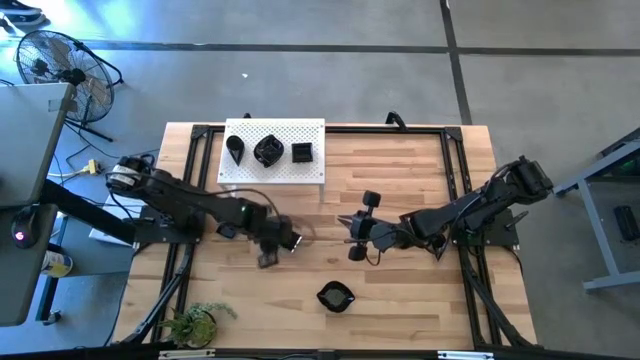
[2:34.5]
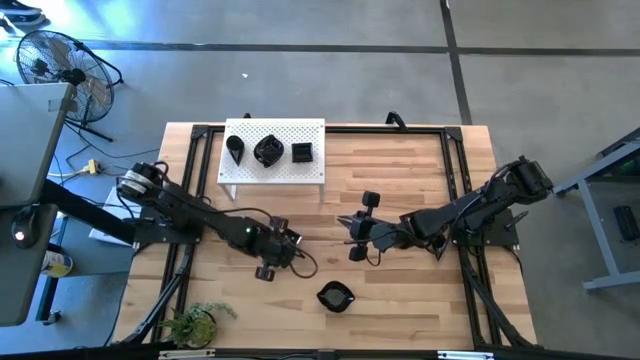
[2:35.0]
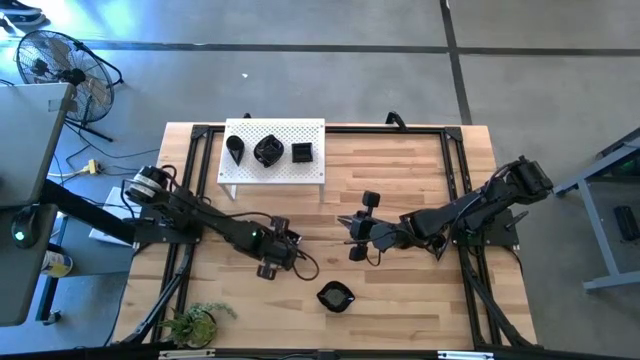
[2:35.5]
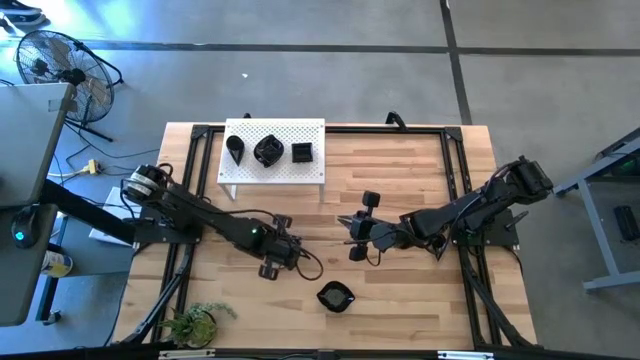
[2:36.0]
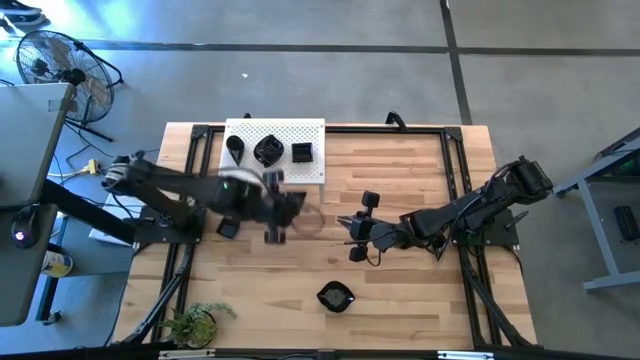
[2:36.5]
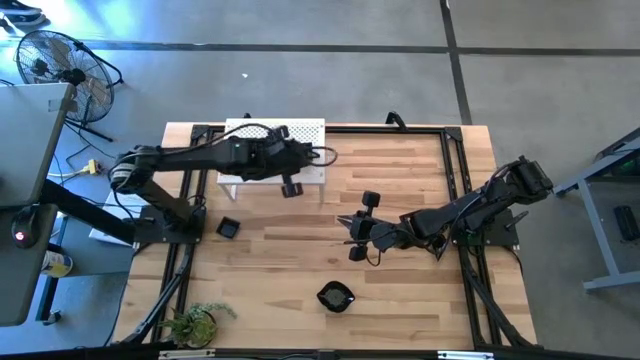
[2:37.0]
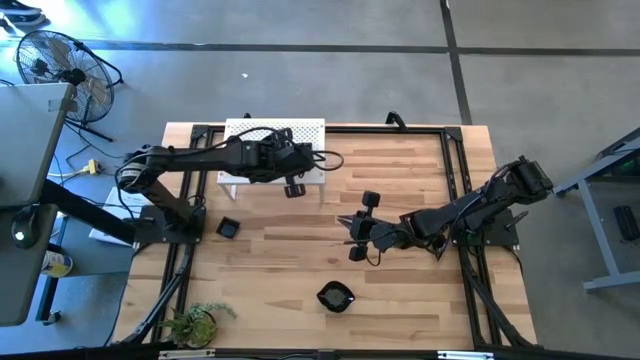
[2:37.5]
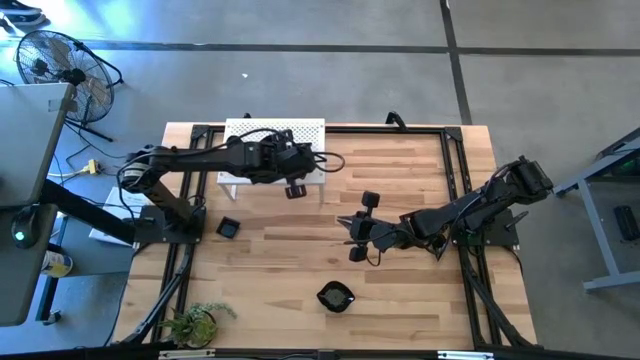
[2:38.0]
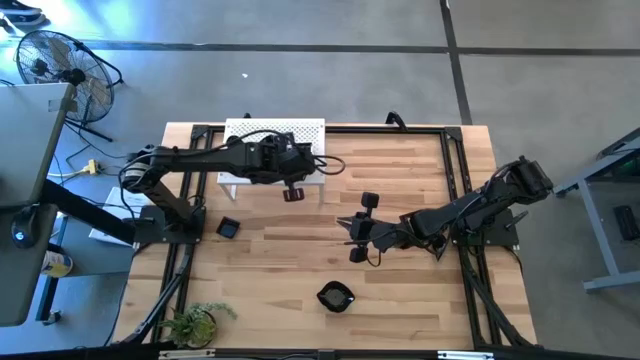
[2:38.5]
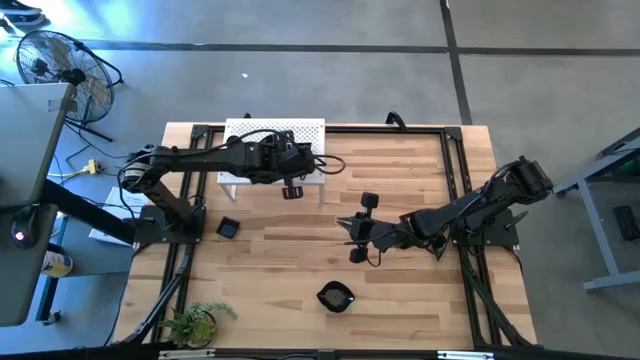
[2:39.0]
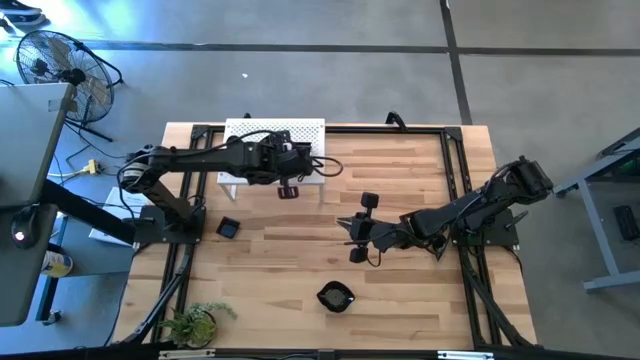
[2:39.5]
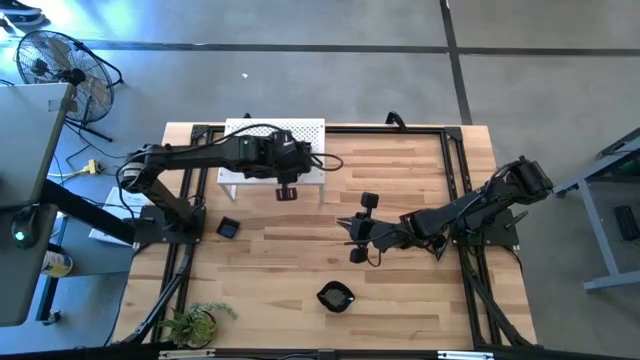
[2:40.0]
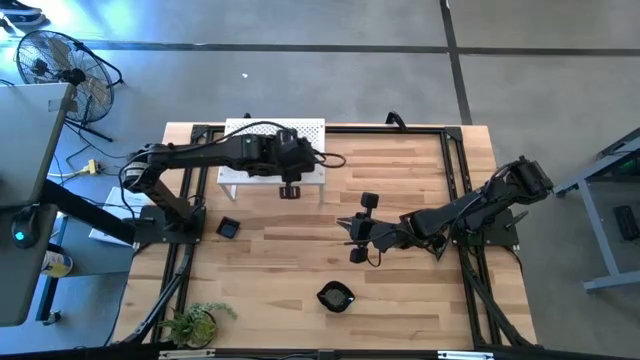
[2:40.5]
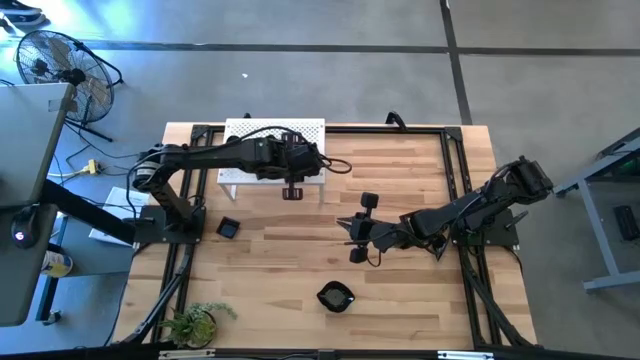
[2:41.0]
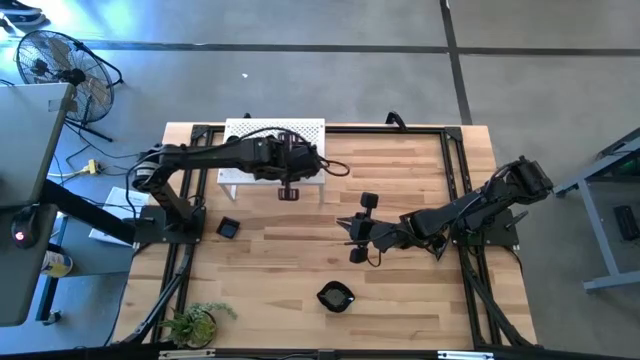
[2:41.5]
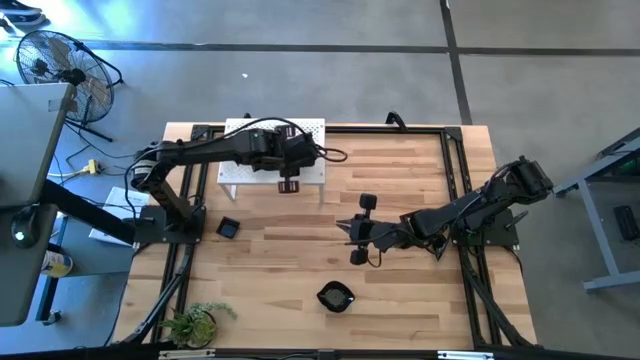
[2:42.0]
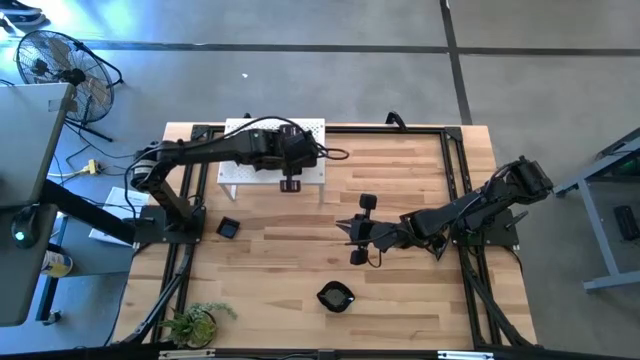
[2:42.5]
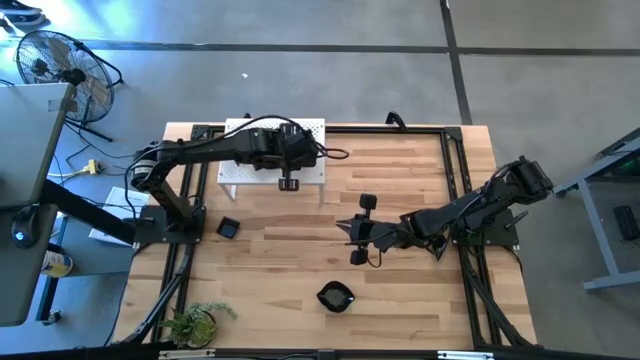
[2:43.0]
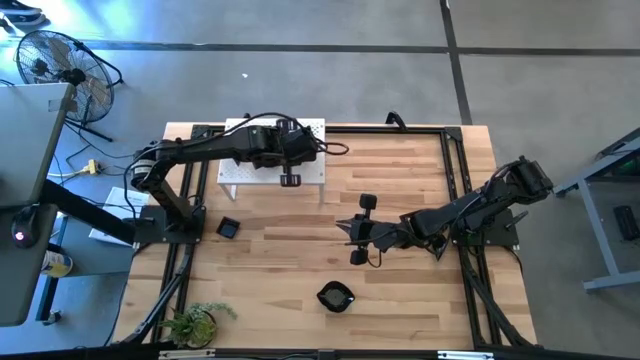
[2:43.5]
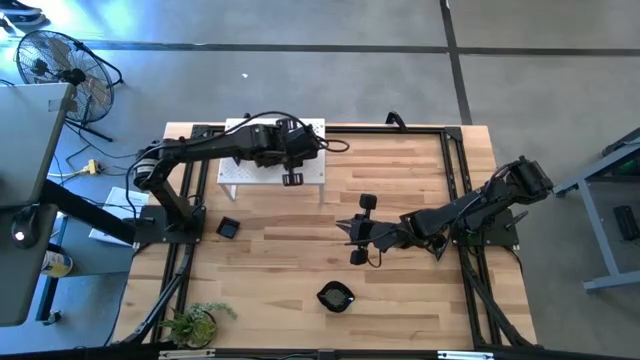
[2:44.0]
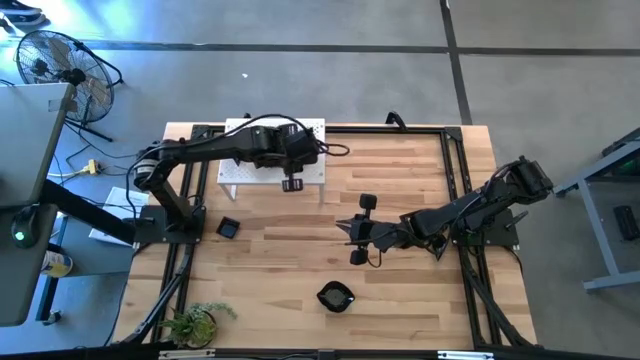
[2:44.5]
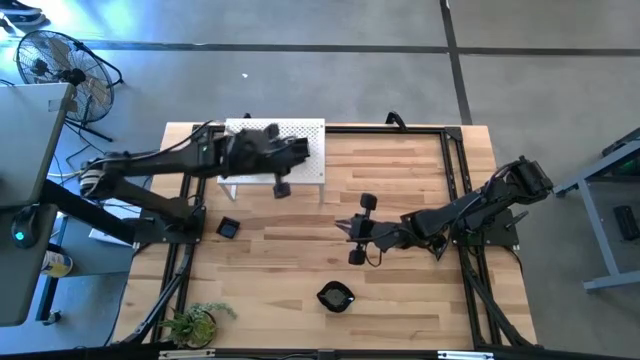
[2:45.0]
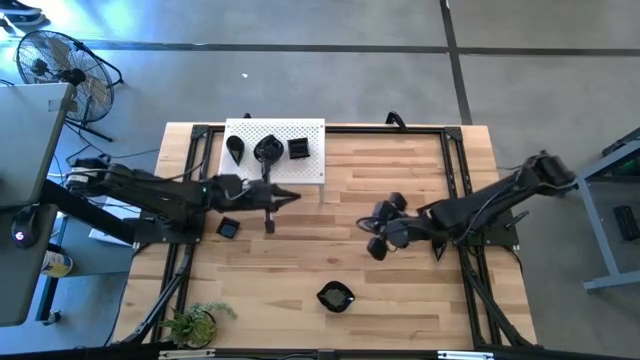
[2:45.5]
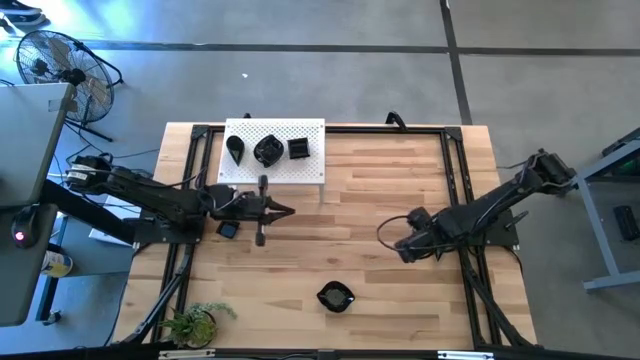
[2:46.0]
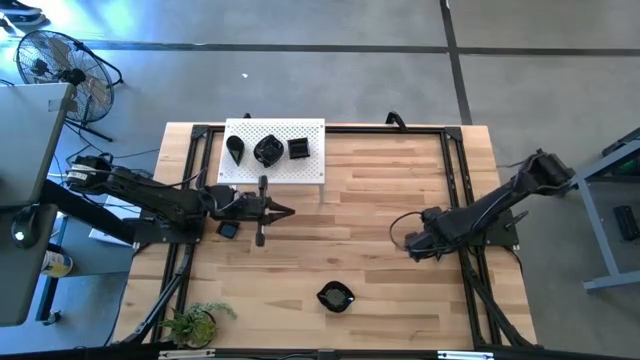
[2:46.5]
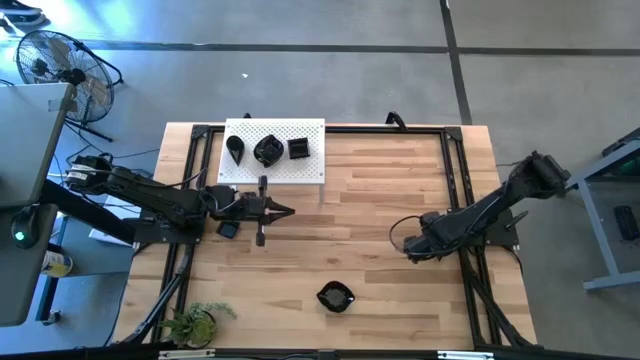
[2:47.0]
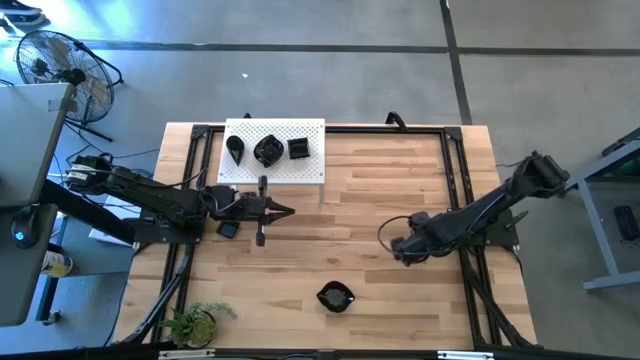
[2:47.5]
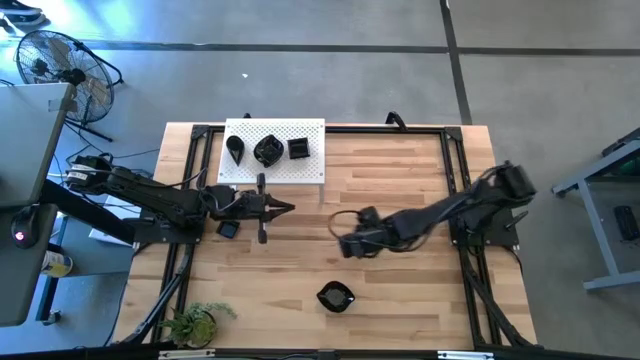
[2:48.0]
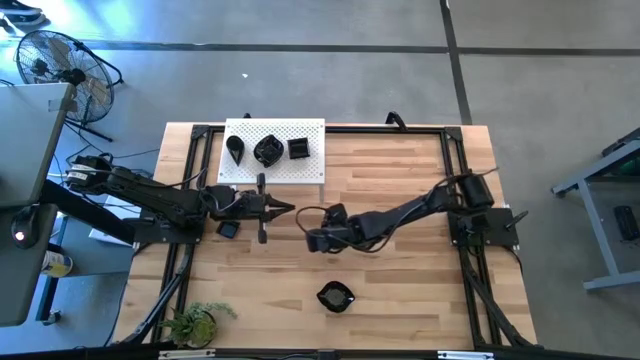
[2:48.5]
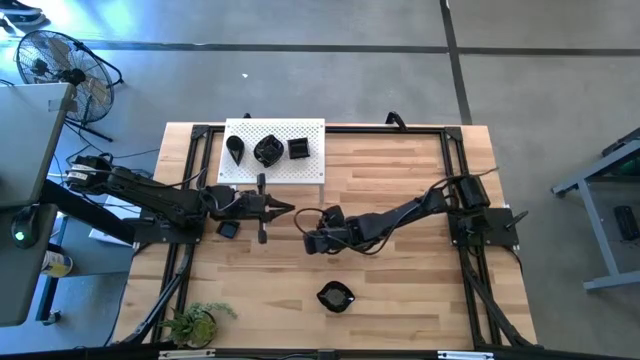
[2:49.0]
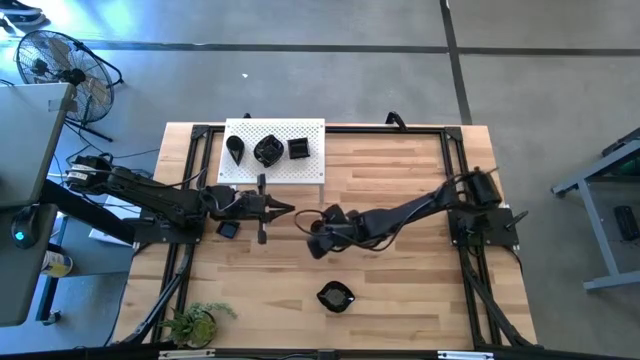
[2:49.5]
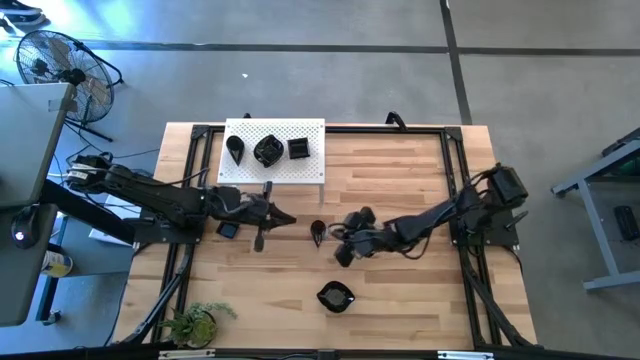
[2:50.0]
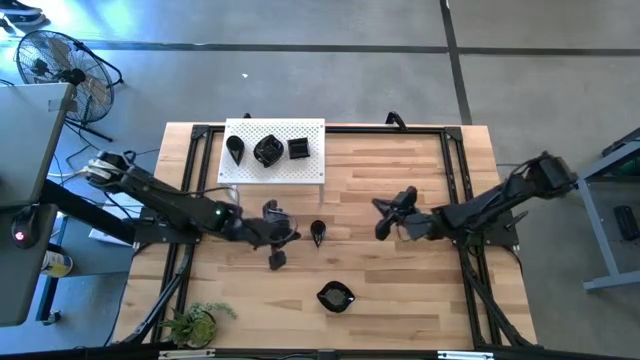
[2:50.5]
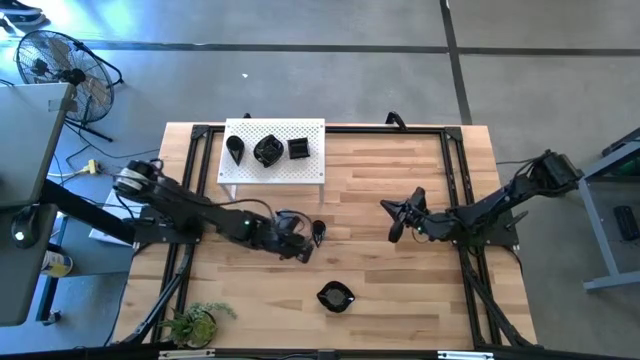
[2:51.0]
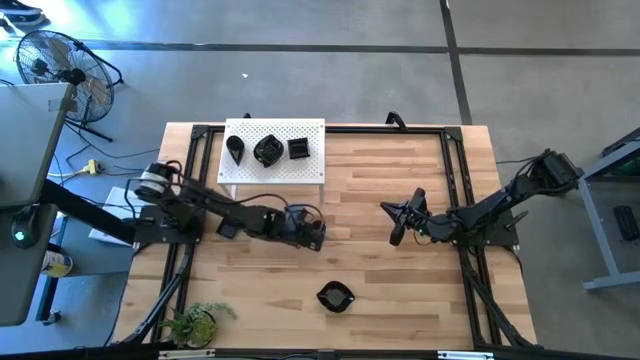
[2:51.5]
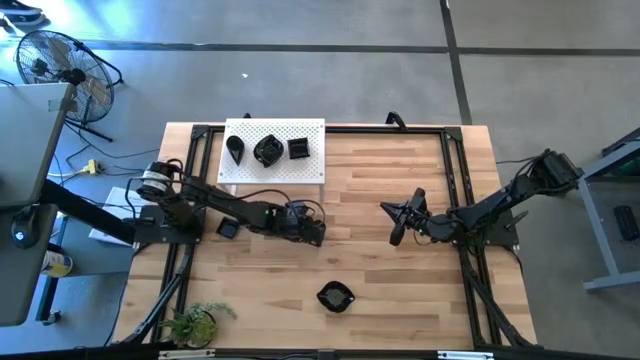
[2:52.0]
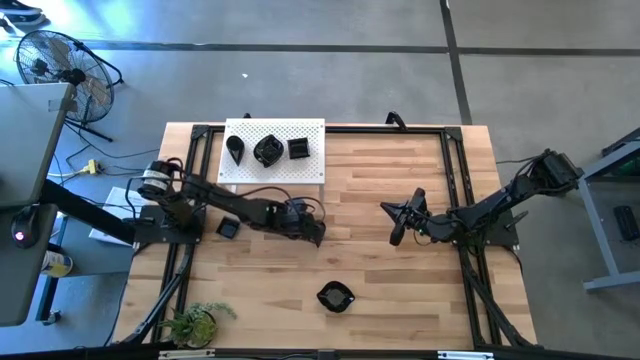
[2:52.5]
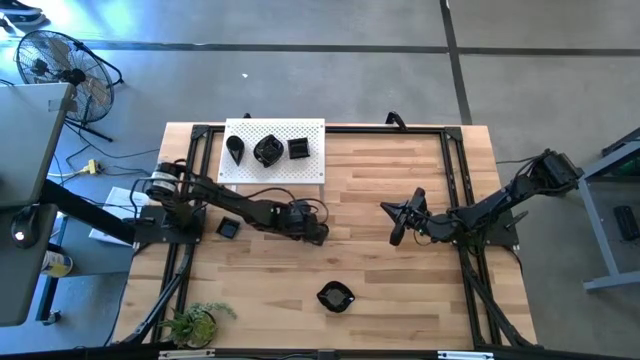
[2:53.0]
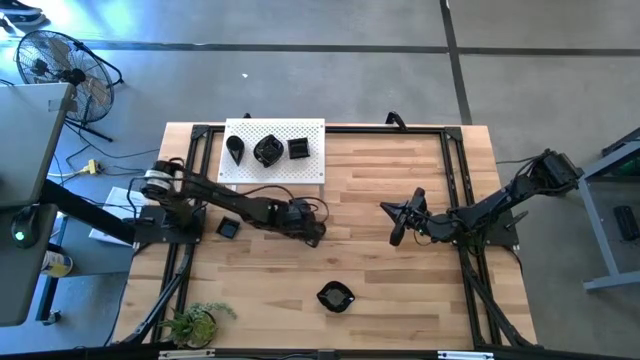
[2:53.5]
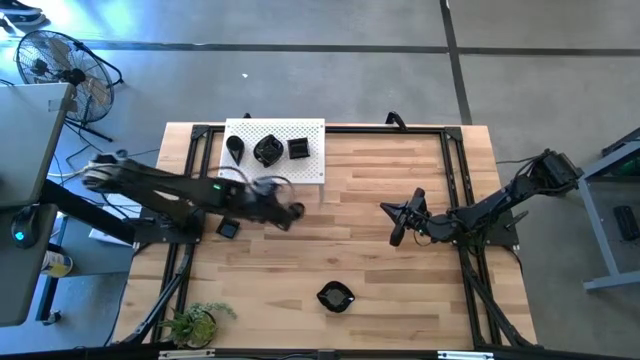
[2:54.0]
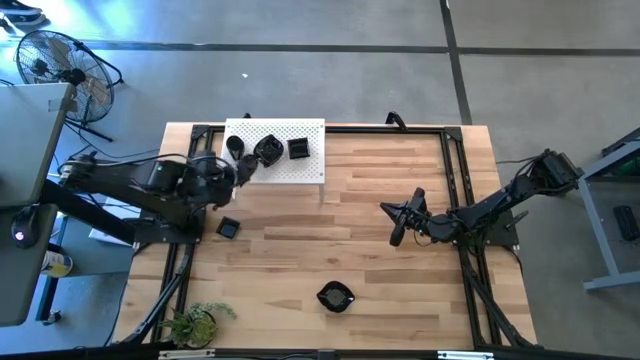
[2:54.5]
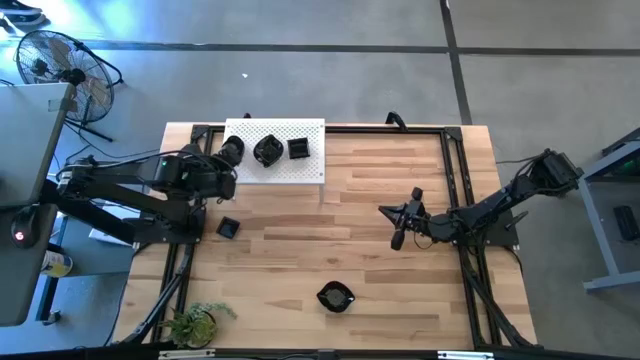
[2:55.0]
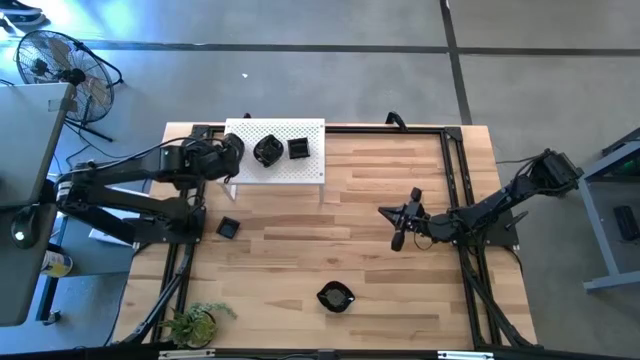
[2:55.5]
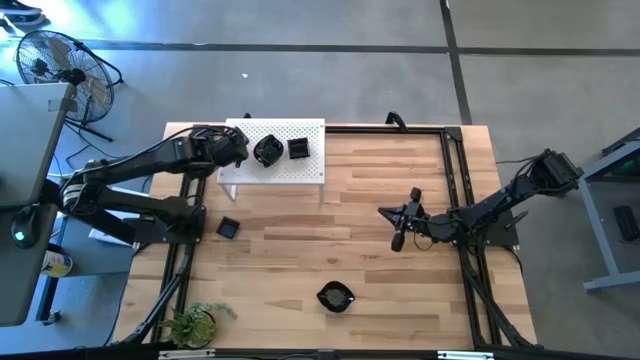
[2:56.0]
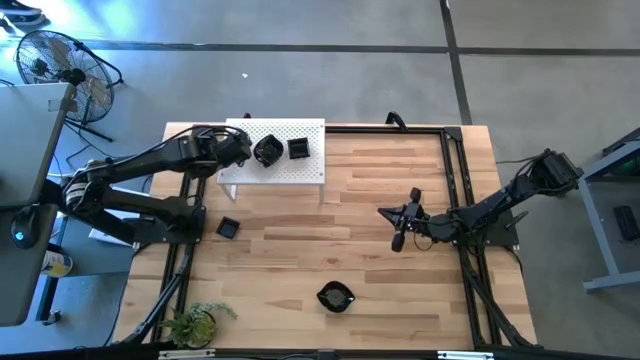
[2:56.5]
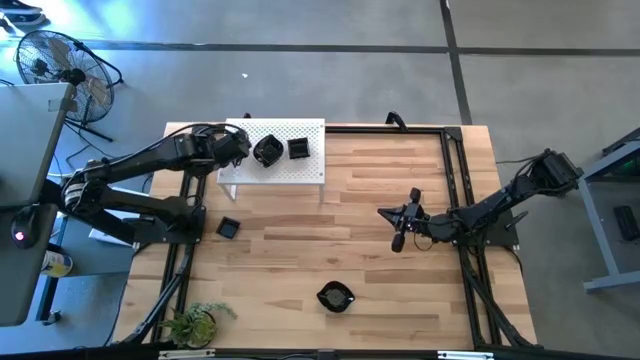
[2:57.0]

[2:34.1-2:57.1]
Task: Pick & Place Mini shaped plates
Stack the drop-shaped plate on top of the drop-shaped plate on the shelf
